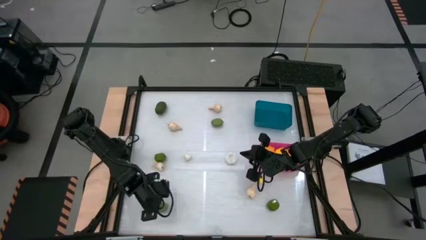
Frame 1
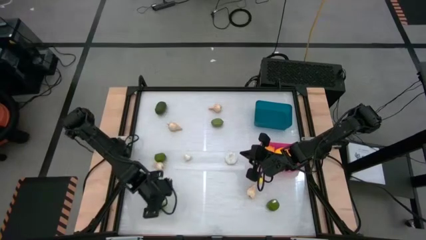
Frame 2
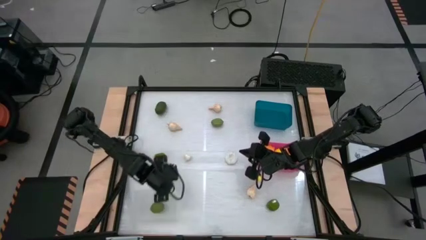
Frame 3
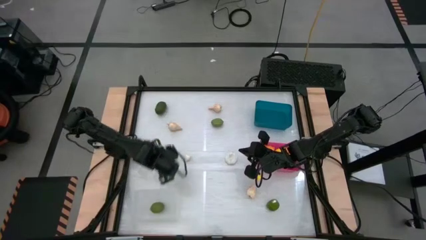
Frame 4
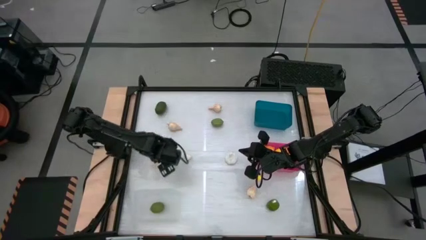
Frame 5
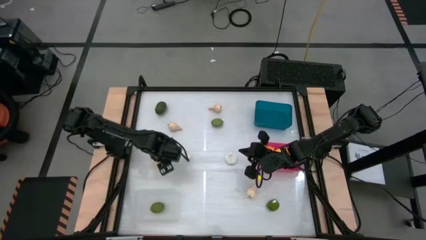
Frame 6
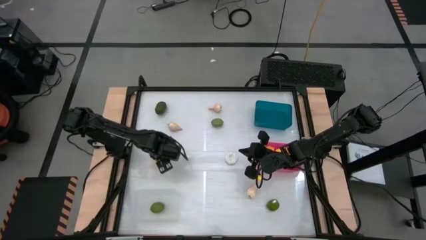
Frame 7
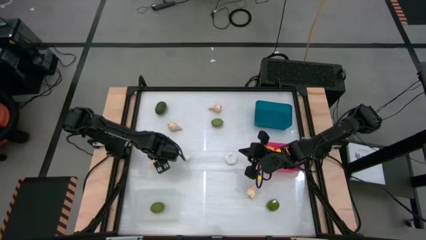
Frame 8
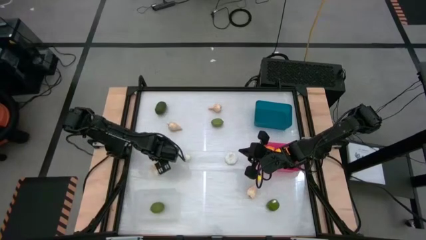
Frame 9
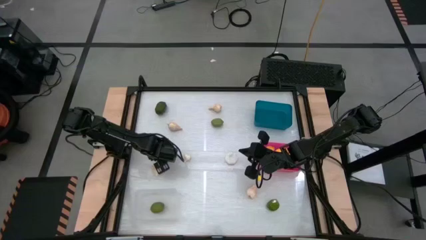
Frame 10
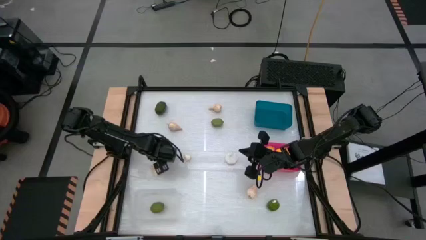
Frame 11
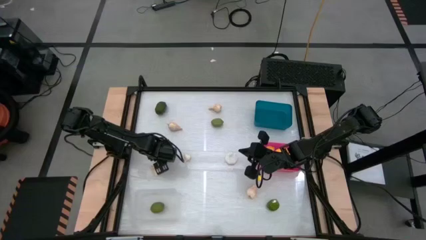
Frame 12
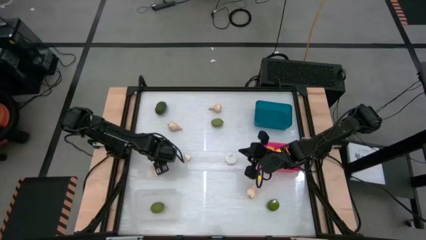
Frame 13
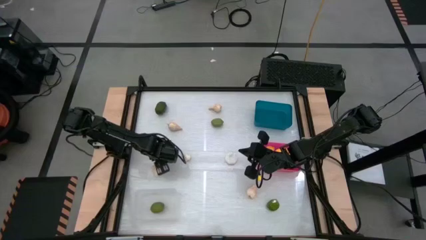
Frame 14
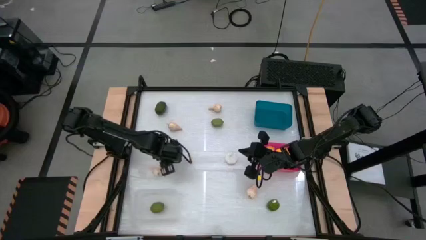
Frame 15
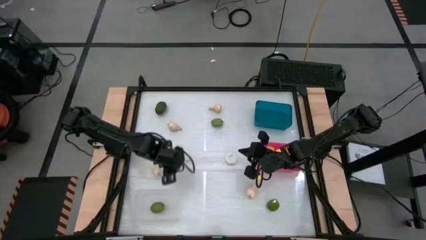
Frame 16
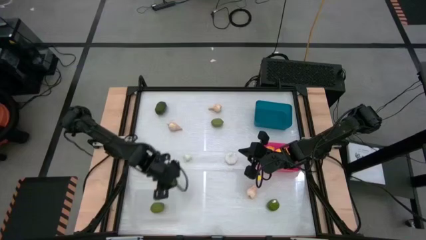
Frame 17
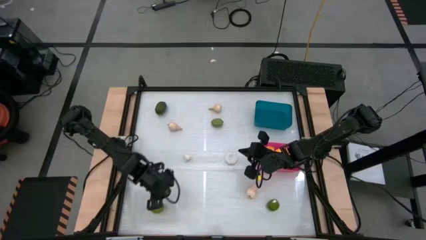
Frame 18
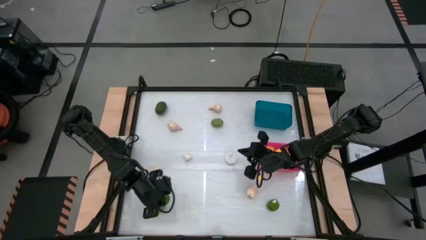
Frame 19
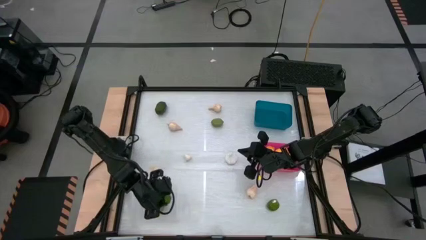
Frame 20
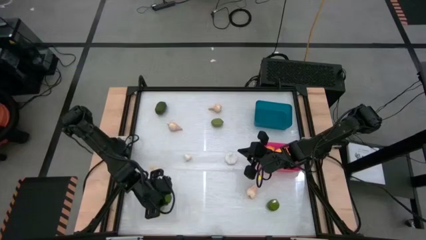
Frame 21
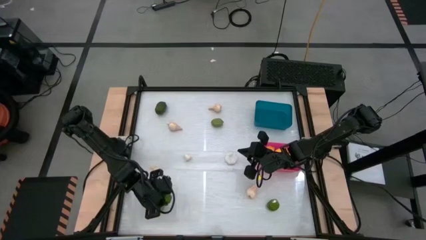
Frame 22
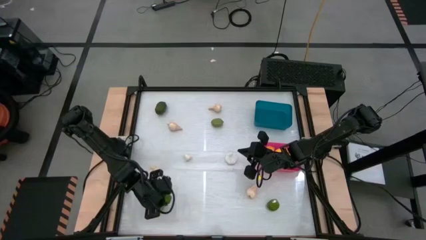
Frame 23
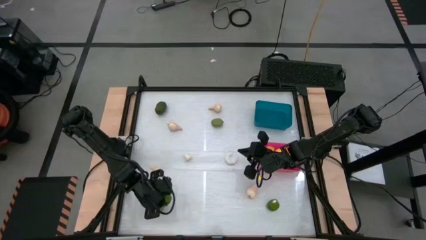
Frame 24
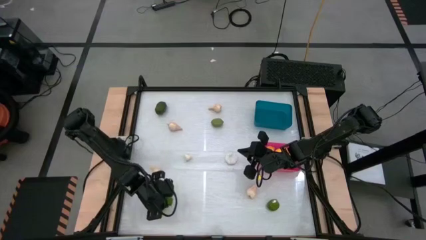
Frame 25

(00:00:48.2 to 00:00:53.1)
Task: Sort produce into baskets
Put the green lime into the transparent bin

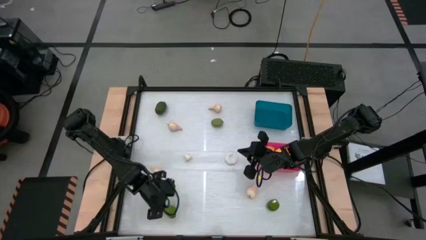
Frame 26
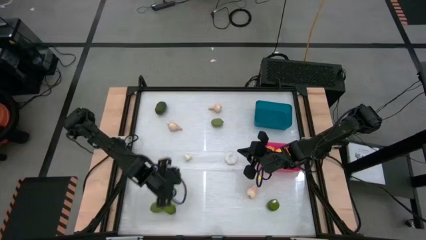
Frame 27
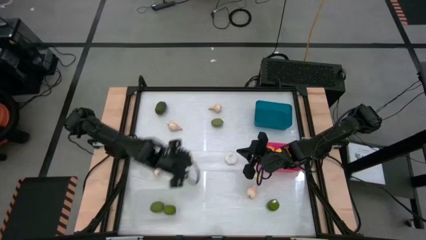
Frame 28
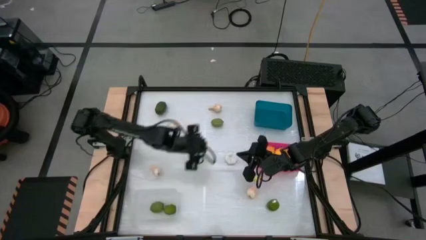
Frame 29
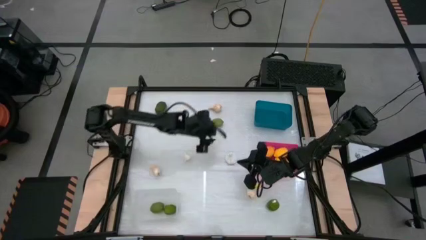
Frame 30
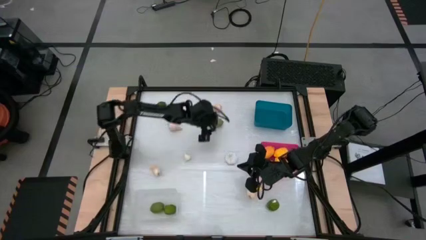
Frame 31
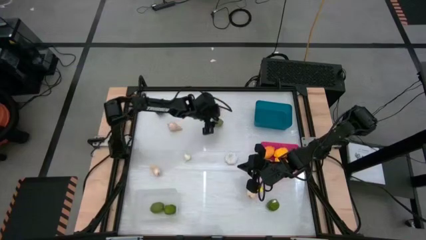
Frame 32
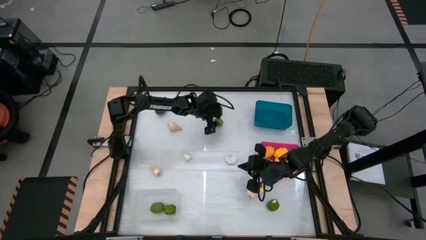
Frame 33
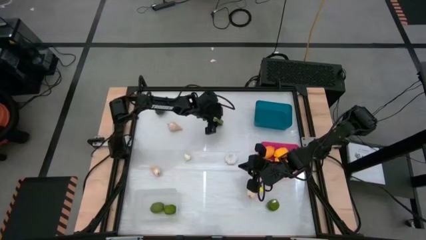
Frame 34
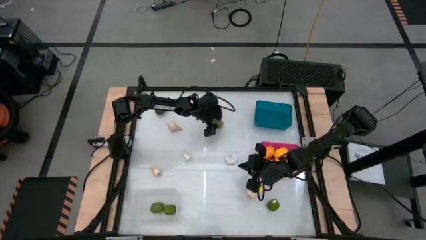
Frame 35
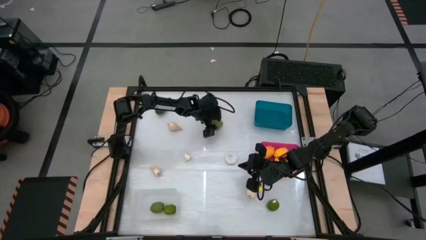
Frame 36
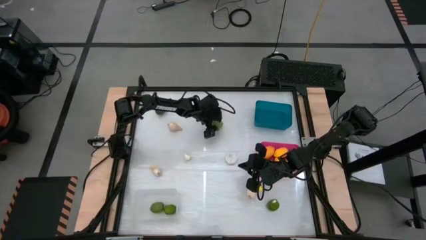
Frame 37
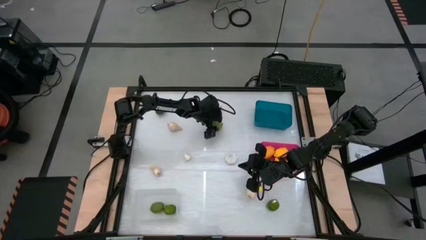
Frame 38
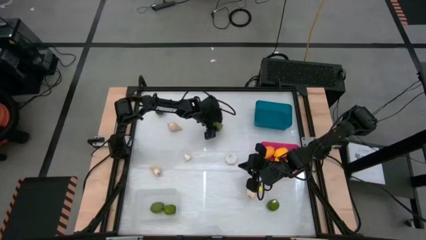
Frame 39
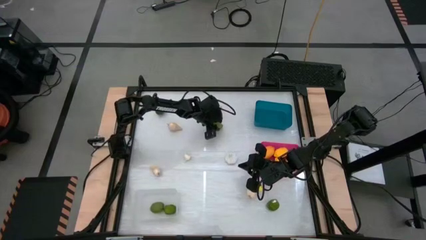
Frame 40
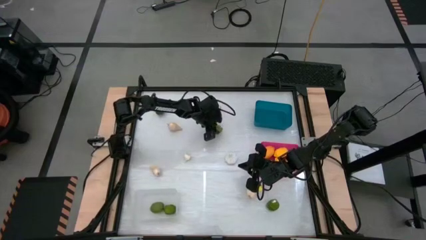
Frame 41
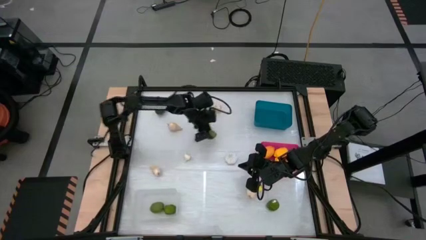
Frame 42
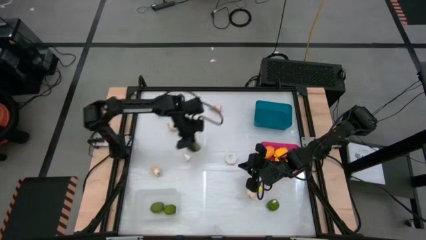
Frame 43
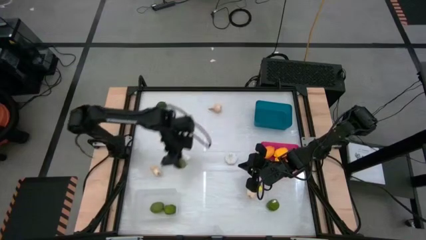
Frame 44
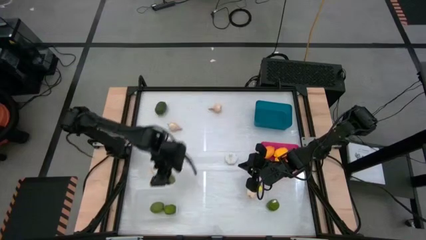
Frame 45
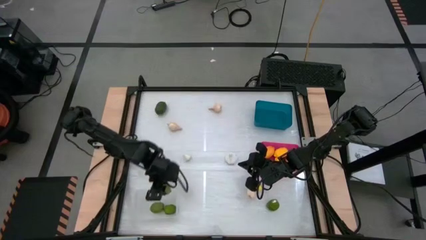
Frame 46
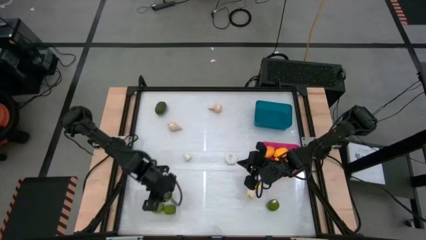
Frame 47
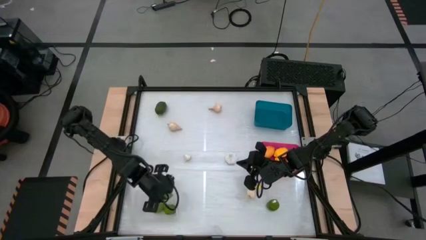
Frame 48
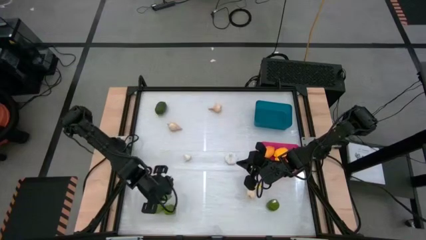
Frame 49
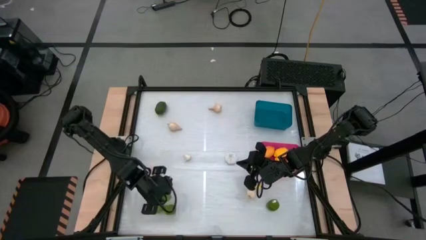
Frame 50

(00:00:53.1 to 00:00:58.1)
Put the green lime into the transparent bin

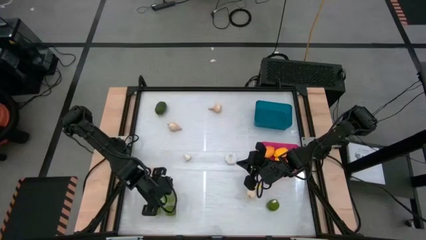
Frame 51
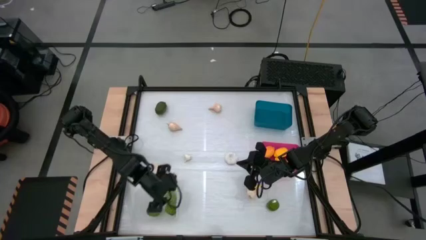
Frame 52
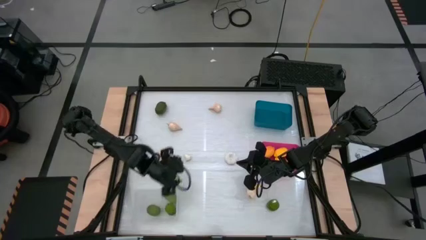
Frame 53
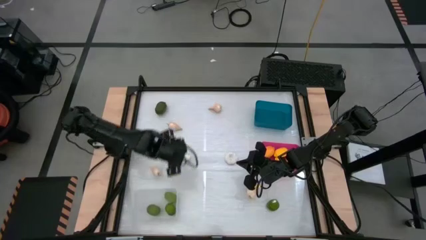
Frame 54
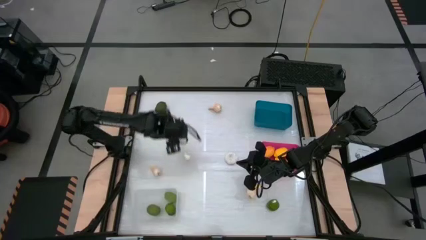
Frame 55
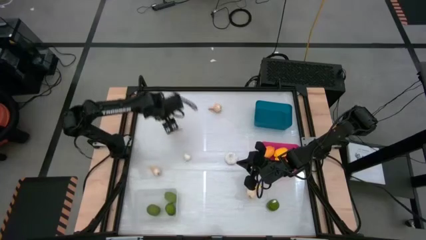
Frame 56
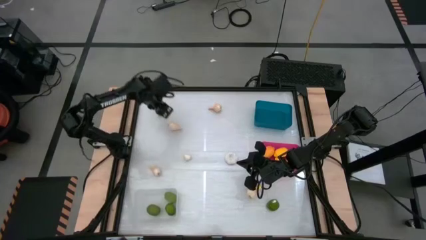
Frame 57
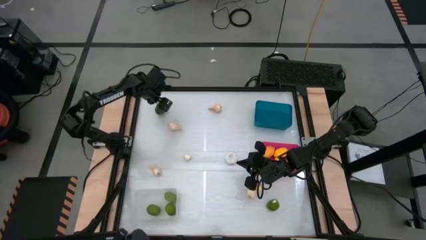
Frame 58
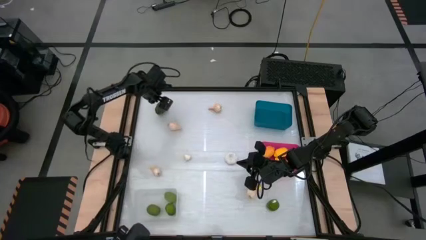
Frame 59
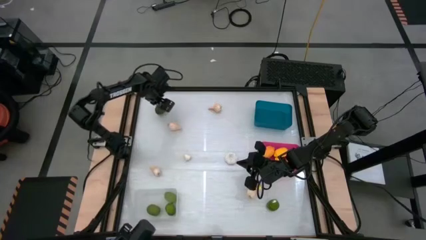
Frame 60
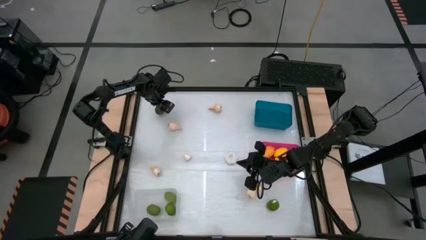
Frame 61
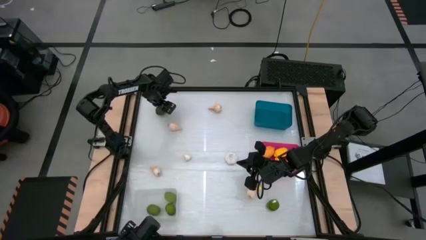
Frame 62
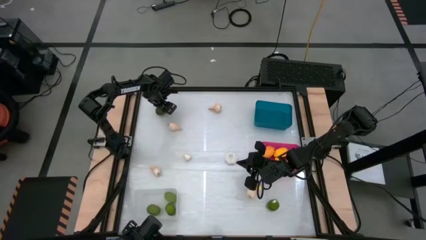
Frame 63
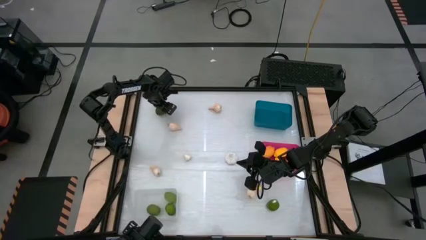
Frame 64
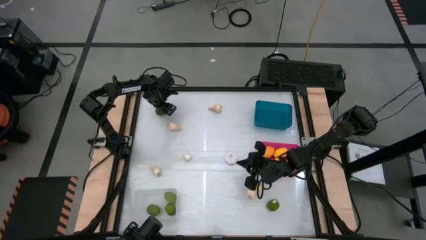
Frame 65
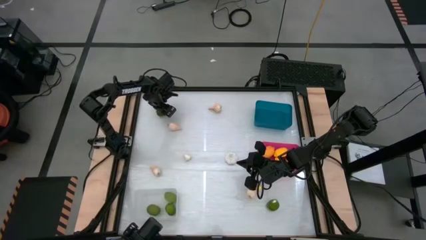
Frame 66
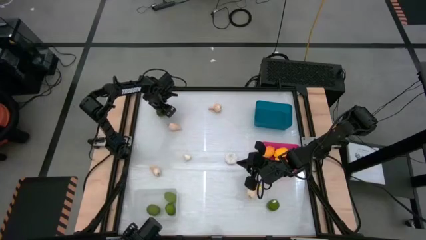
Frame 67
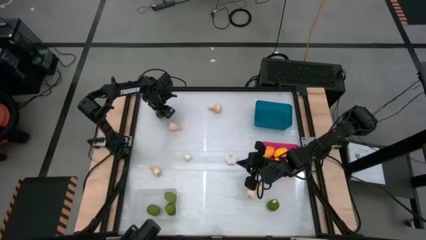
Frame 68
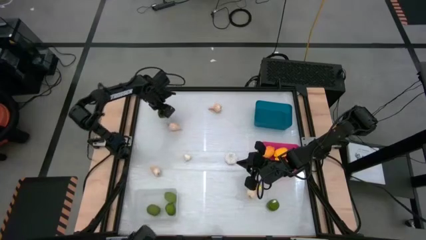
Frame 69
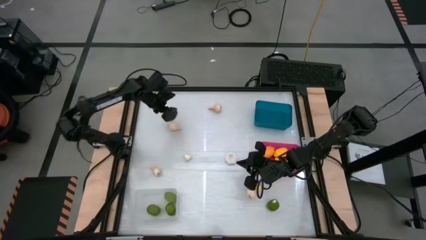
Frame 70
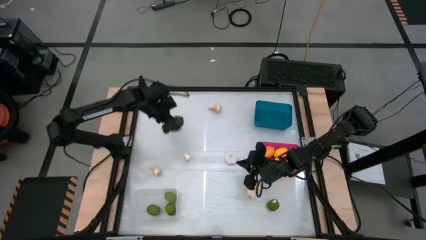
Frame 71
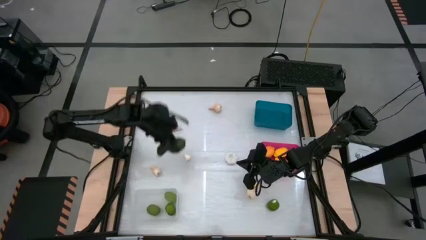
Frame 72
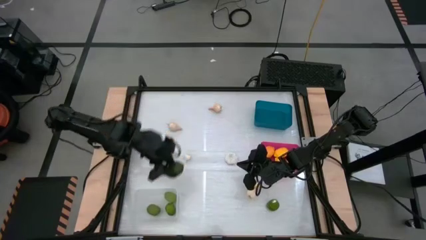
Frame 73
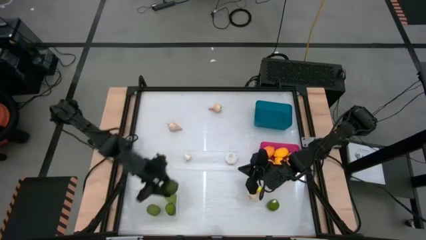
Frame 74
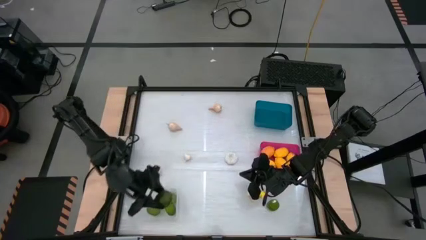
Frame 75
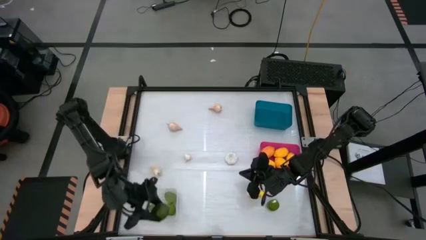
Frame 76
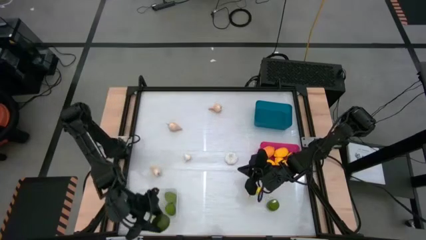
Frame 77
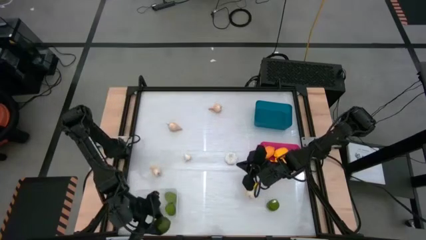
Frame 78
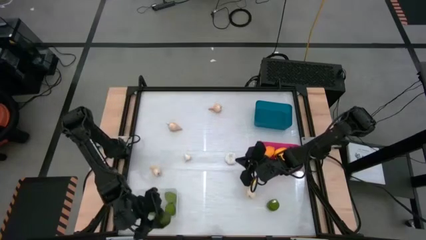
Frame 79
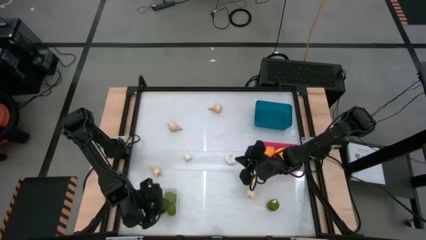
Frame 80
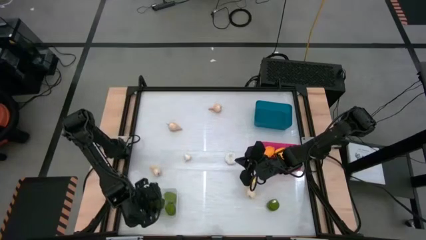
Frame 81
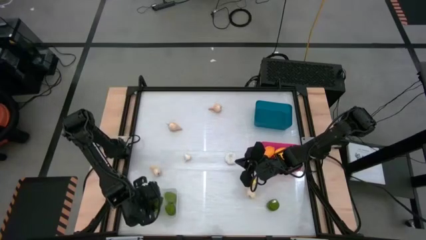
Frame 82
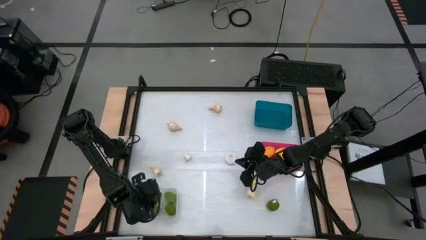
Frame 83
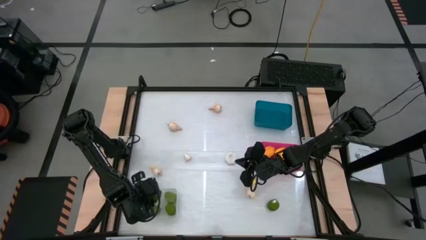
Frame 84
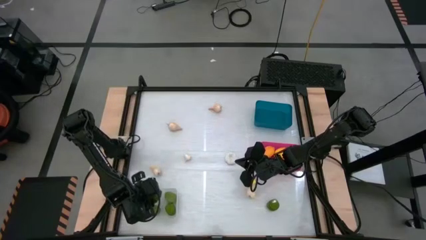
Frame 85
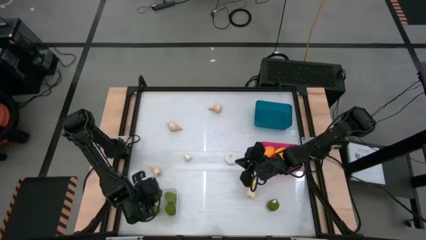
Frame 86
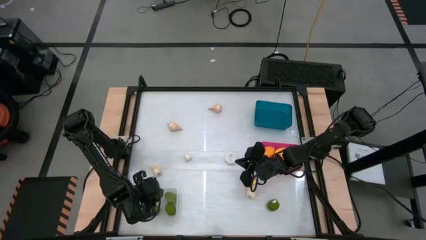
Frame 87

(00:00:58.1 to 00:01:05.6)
Put the green lime into the transparent bin
